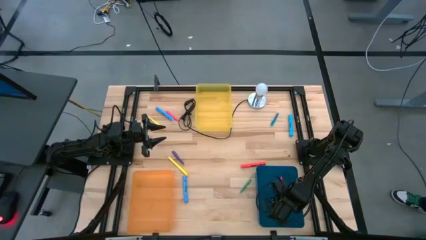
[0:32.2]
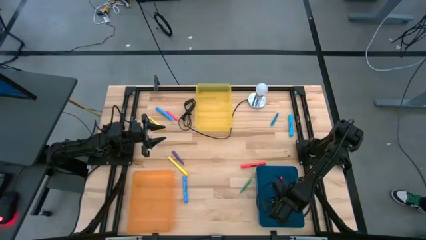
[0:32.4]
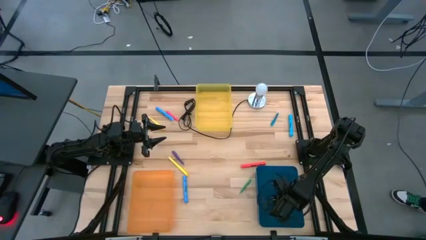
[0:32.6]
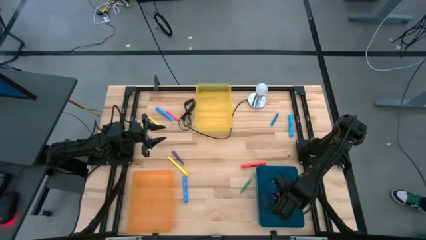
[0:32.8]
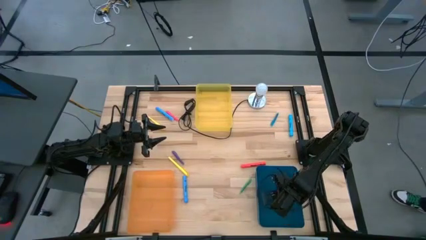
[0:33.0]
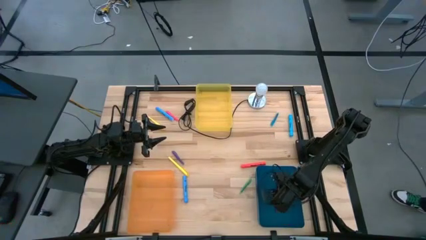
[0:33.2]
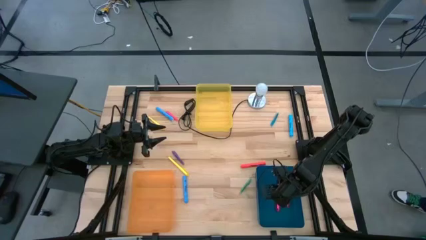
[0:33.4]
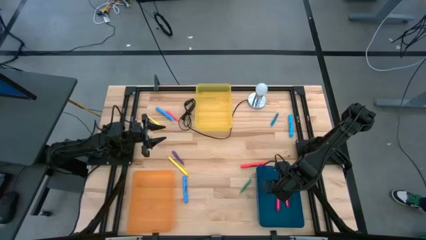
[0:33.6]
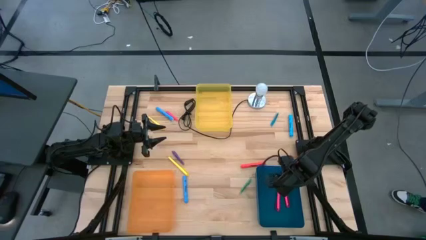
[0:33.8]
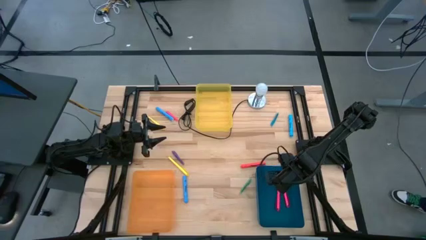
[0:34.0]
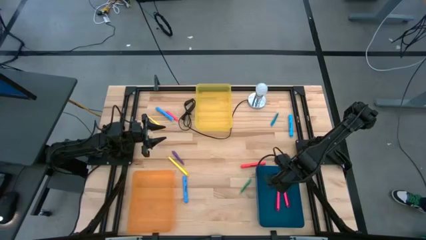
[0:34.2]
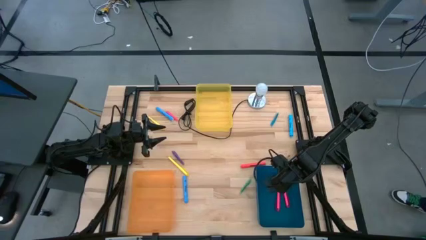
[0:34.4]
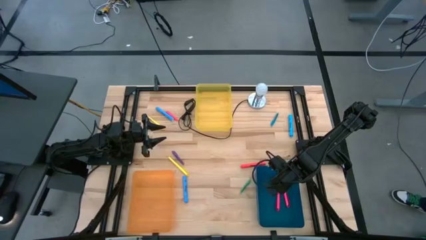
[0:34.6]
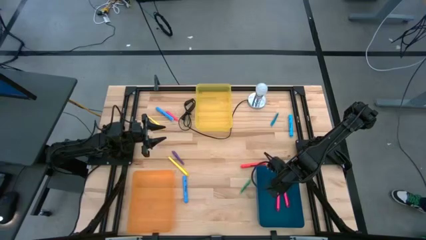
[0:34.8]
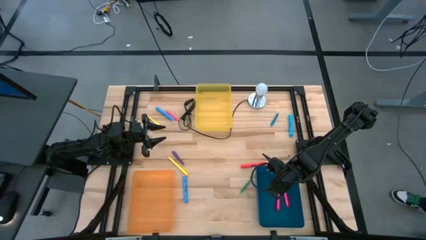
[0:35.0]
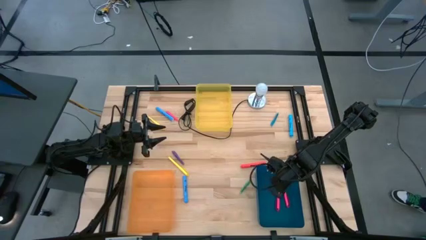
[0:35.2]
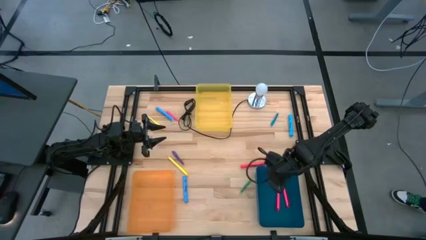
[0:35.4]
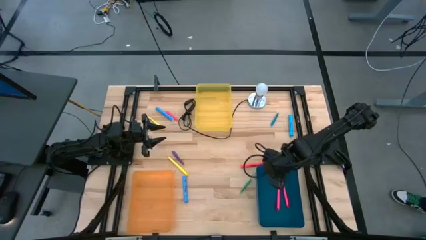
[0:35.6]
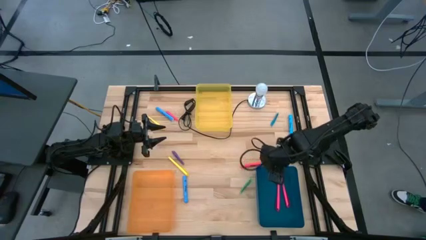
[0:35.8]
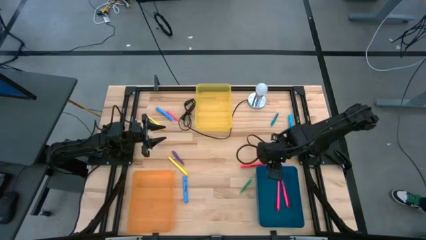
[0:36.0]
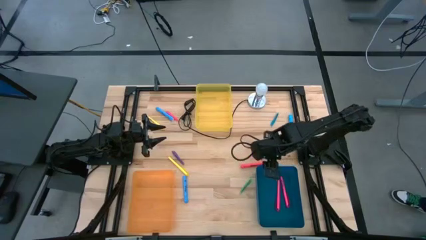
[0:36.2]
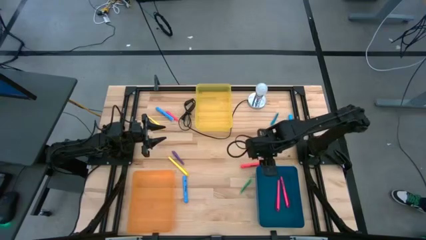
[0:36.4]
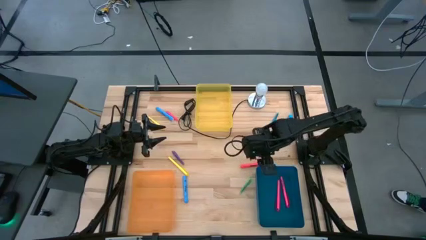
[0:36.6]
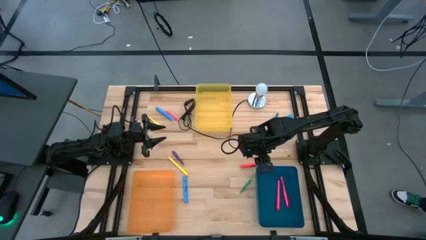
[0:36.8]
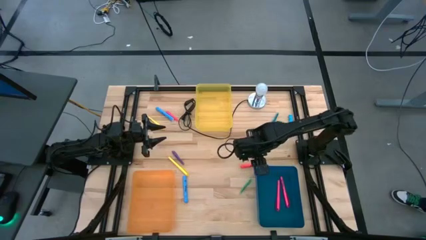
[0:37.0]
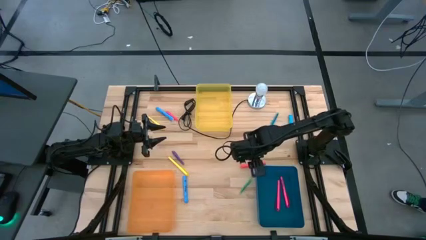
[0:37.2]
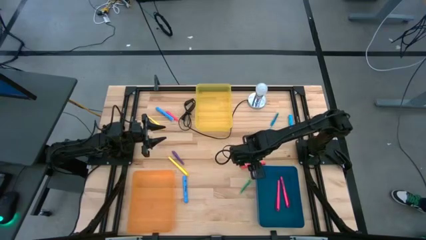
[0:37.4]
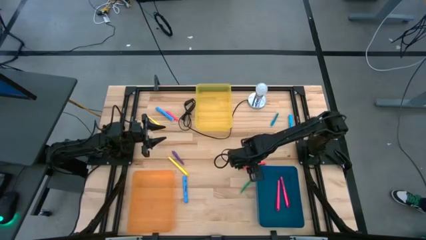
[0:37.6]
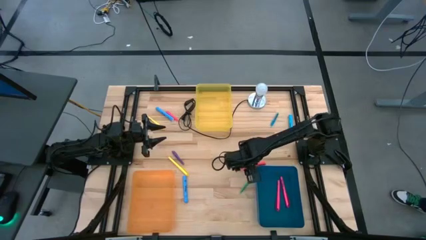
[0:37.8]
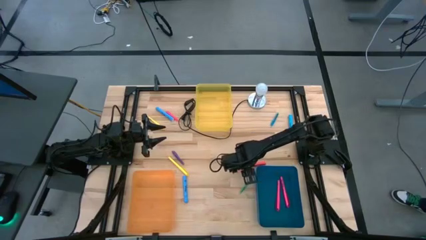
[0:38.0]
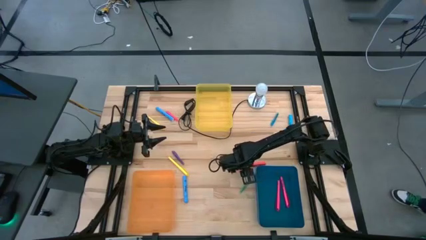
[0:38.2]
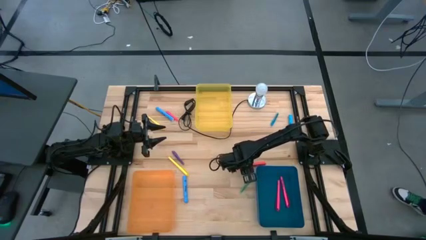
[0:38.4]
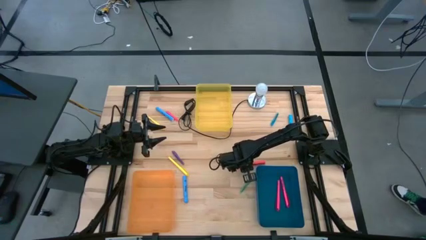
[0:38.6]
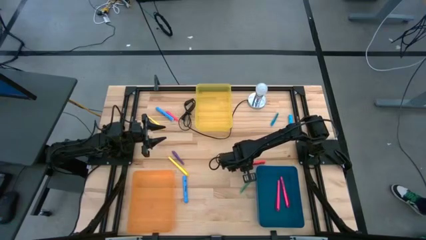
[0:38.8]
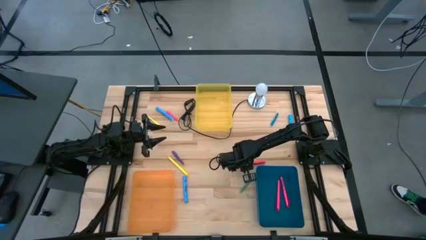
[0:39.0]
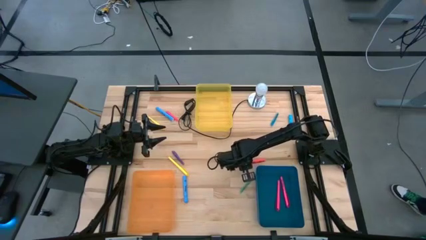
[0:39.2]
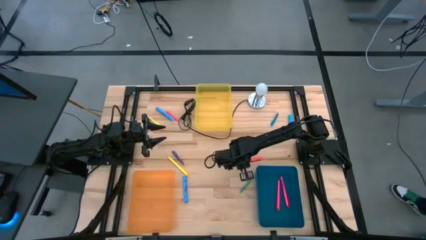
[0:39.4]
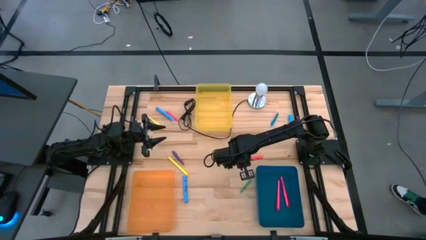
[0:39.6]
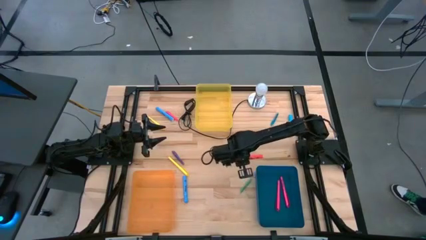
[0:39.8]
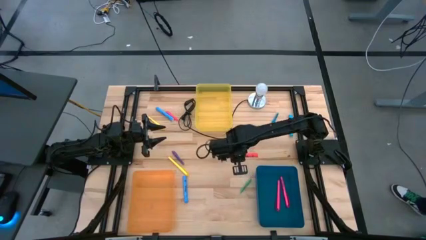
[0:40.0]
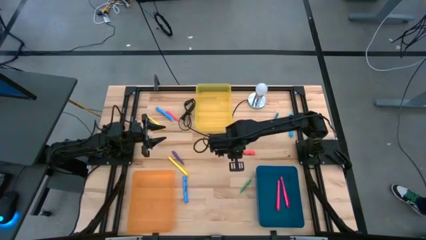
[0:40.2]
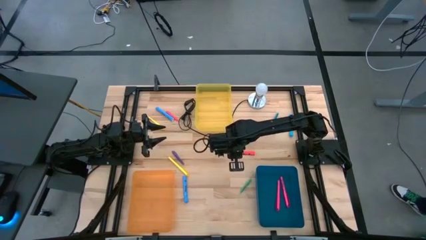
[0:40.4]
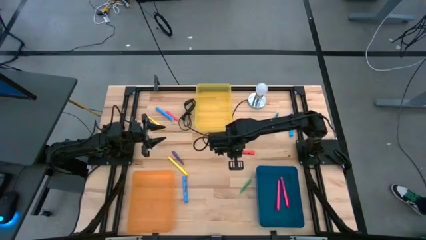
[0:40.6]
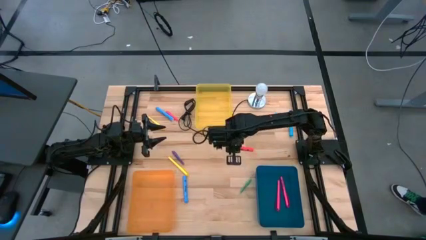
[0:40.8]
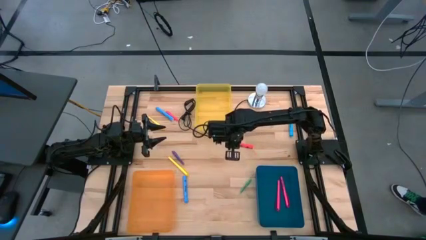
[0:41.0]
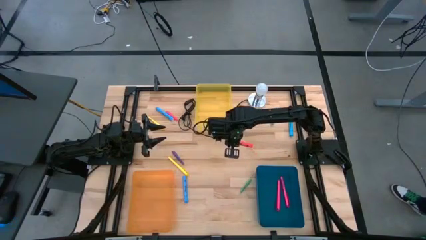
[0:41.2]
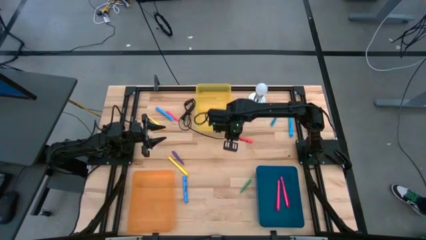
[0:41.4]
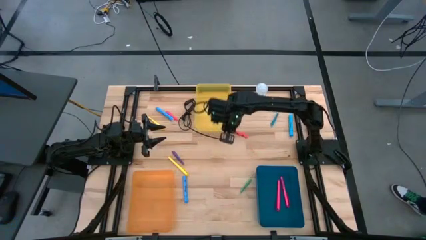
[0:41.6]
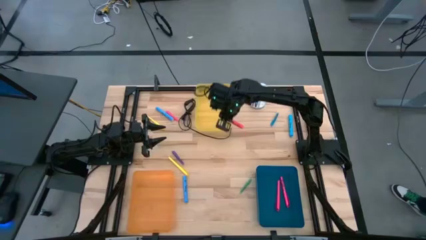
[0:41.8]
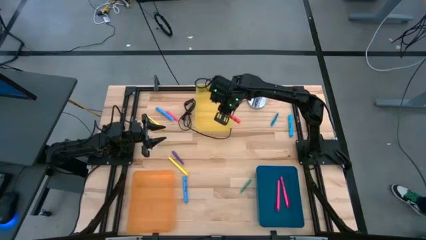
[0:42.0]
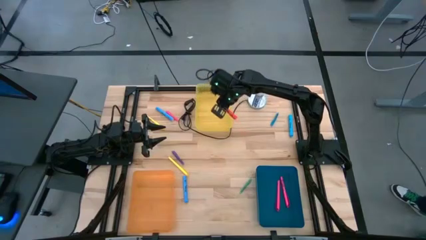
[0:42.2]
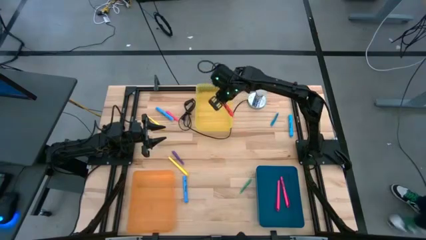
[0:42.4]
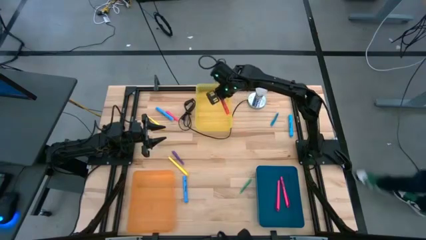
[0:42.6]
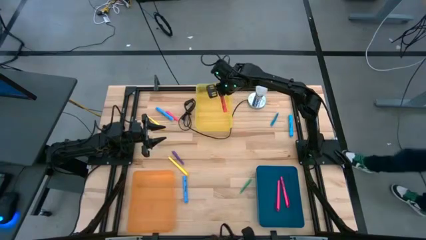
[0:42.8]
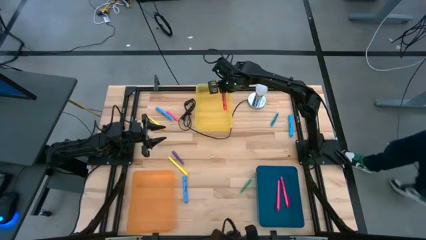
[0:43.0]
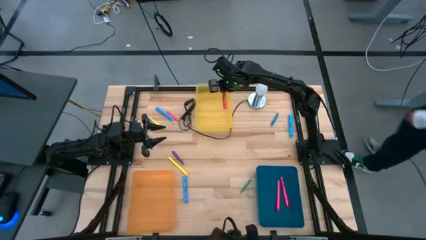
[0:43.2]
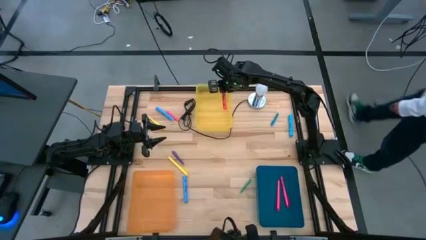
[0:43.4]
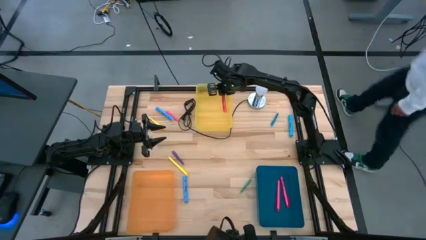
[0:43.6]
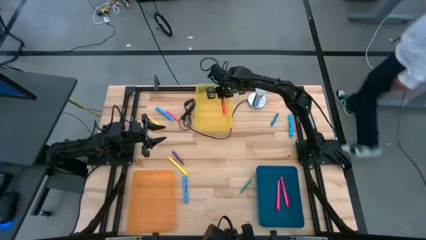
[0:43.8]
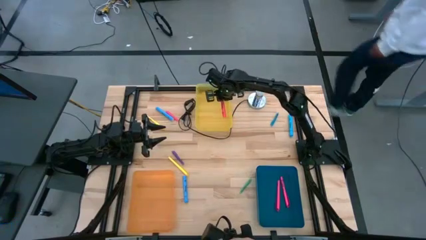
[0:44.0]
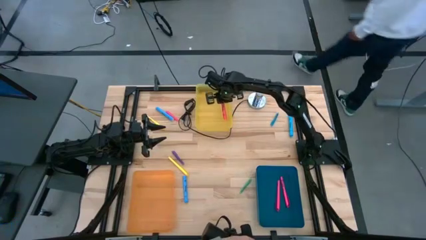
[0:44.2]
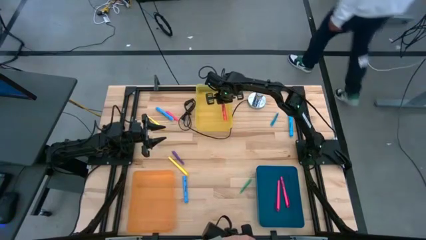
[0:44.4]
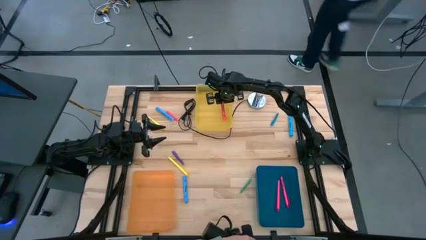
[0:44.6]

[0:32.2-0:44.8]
Task: Pick & Place Markers
Put the orange highlighter into the yellow bin
